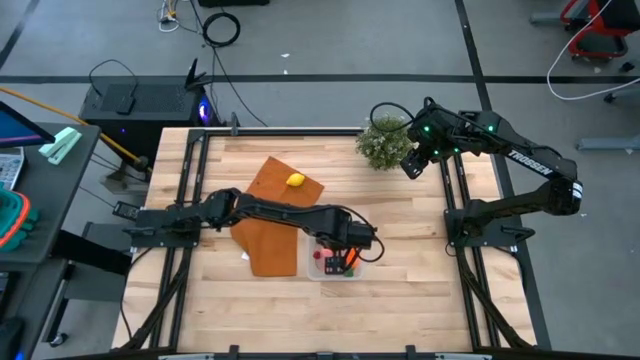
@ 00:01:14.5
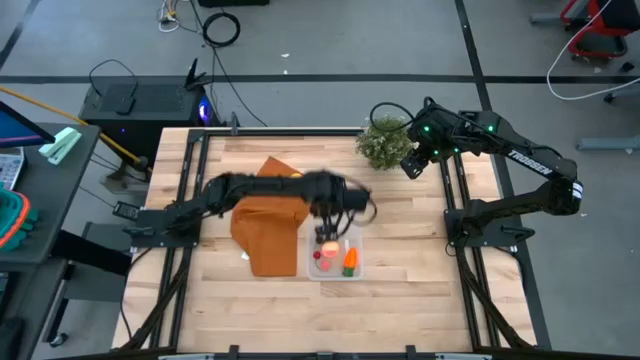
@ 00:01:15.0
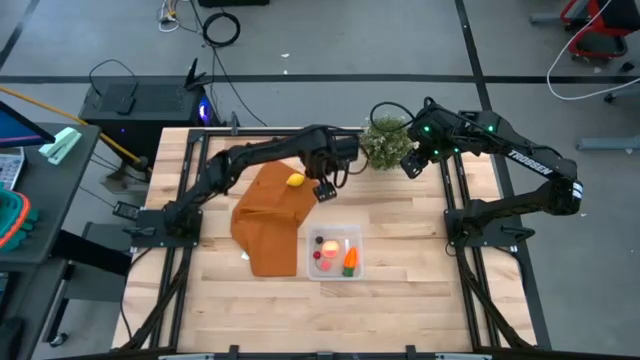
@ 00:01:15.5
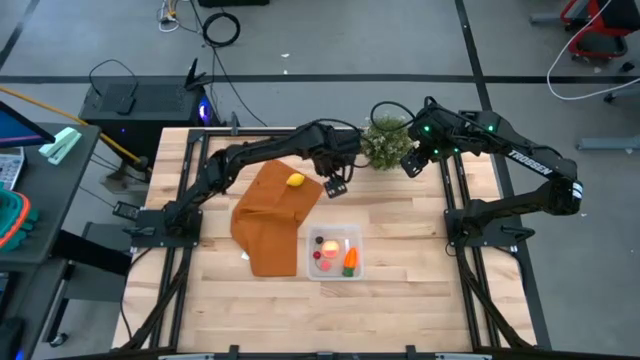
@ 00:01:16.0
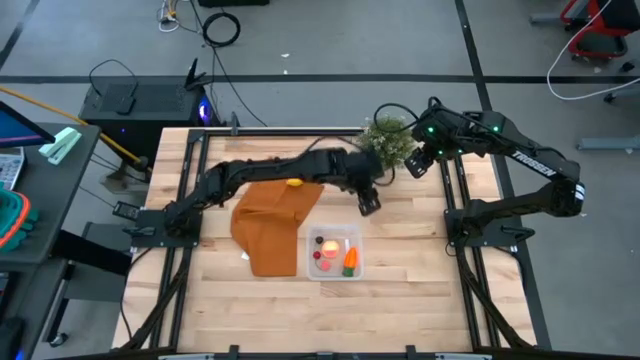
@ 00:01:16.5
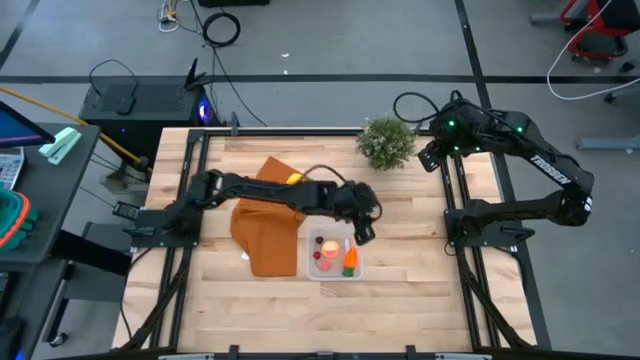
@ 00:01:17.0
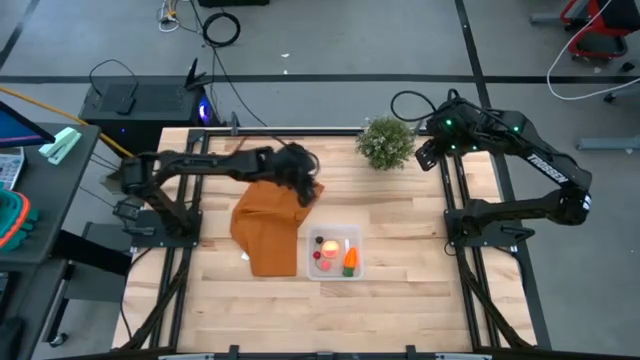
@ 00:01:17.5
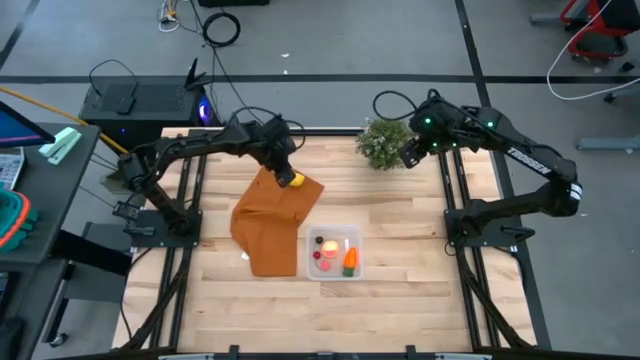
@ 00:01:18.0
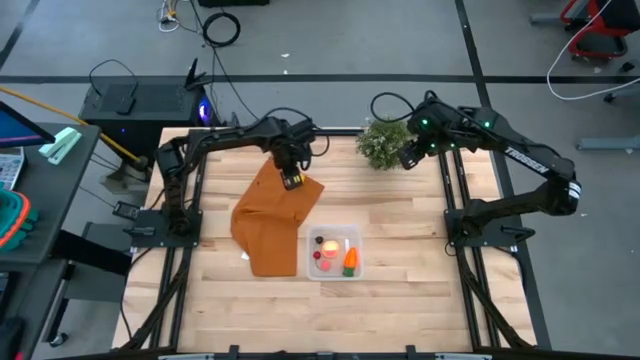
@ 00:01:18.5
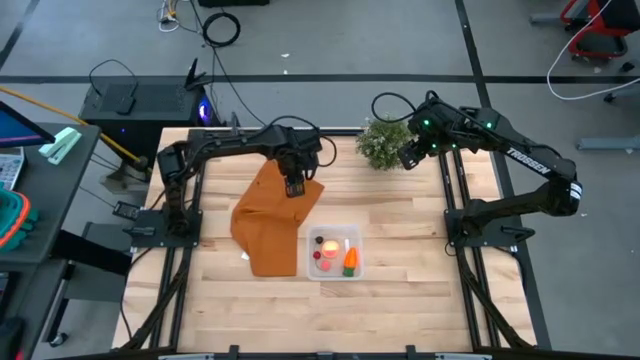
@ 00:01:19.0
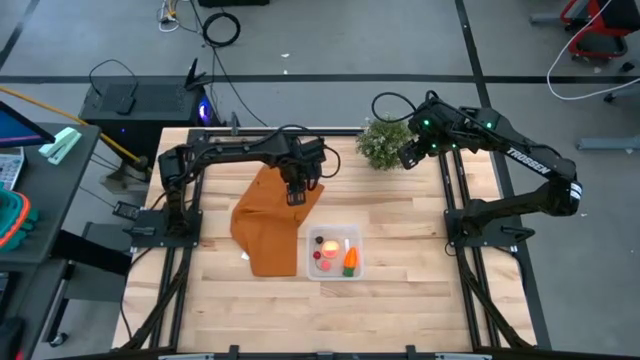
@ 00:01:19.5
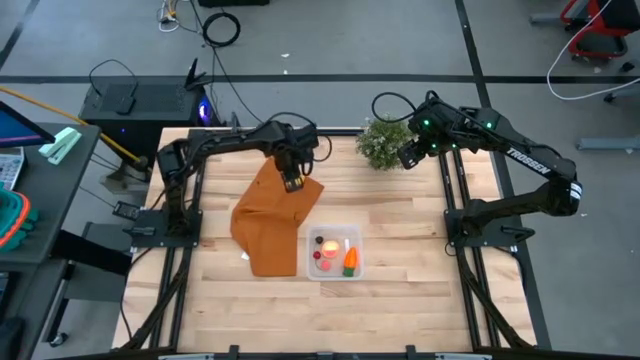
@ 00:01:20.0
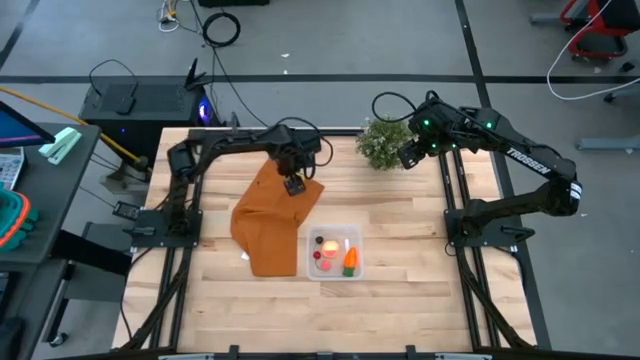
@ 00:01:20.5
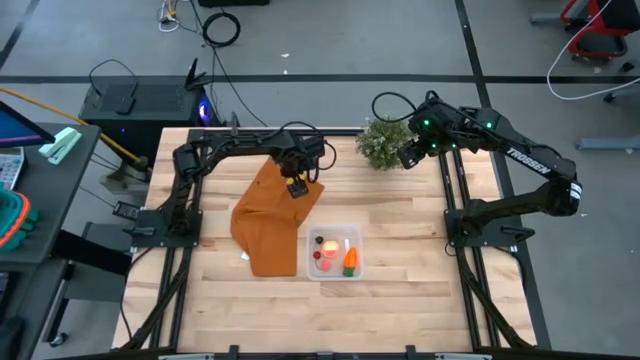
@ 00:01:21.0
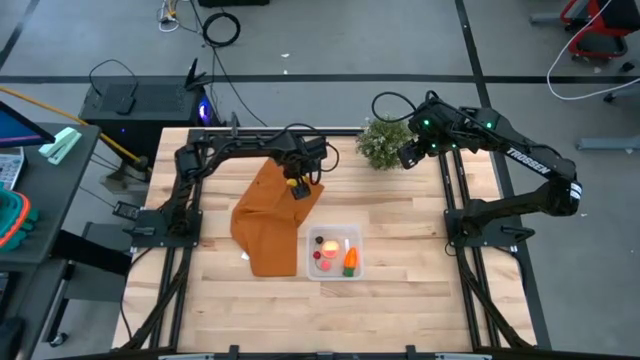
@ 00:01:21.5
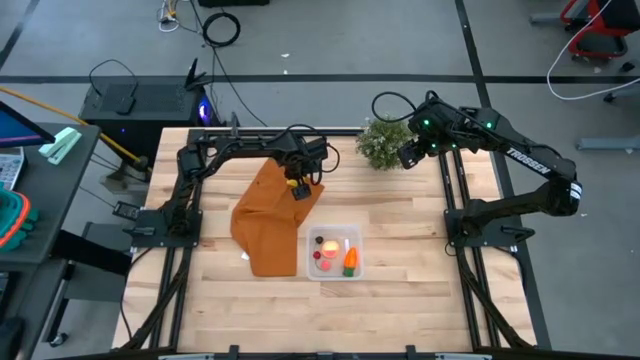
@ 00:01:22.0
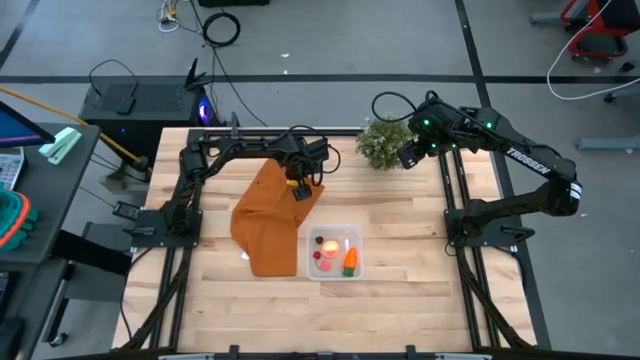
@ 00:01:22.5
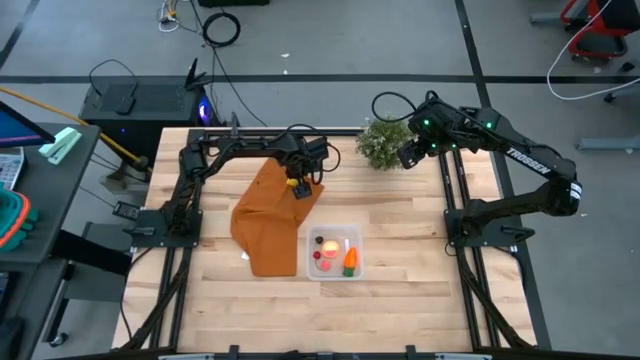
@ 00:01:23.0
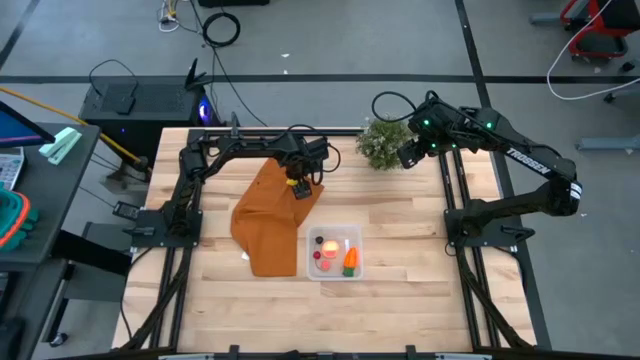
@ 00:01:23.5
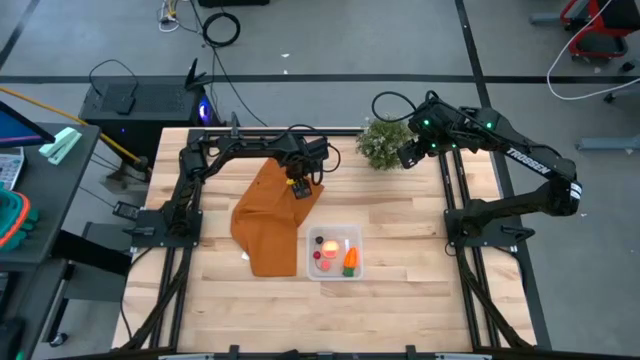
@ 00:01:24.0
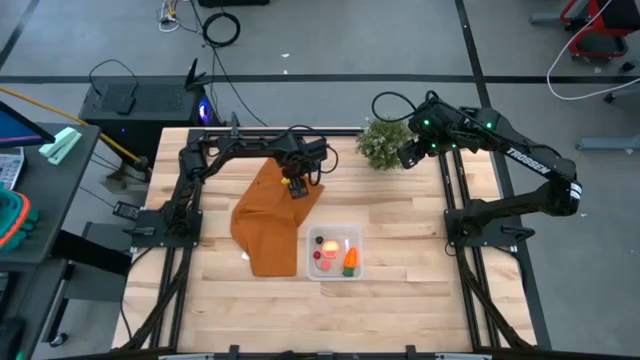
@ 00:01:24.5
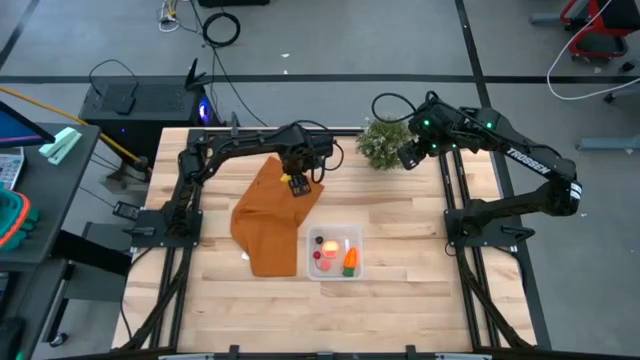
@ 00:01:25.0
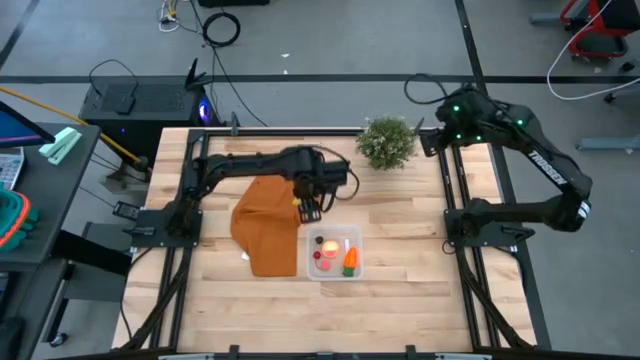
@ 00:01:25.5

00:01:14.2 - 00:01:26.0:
Task: Pick and placing Produce into tupperware
Put the yellow lemon into the transparent bin

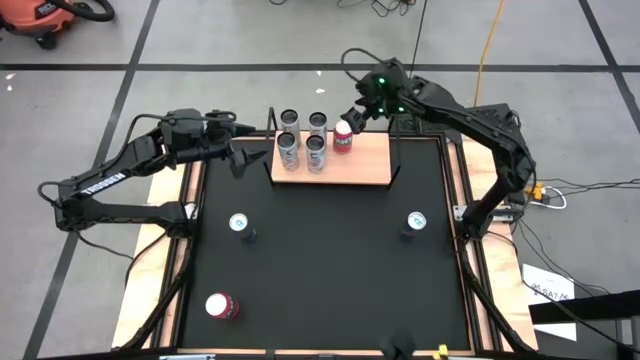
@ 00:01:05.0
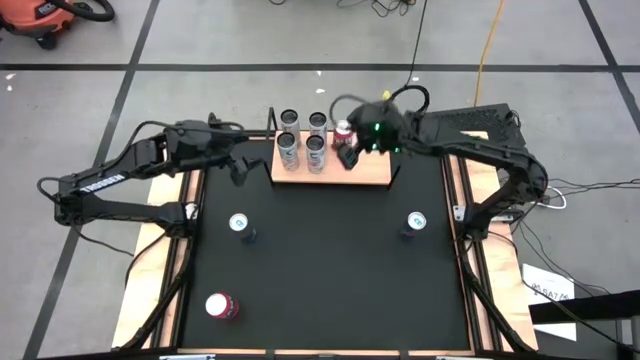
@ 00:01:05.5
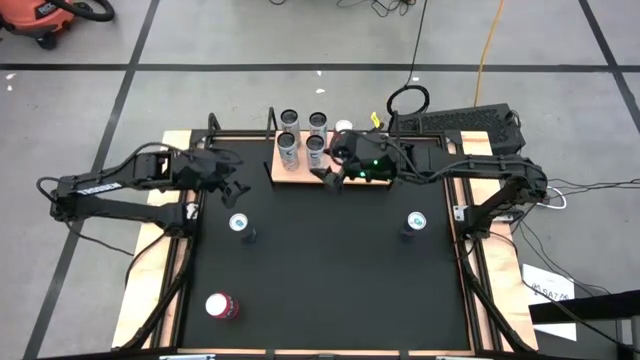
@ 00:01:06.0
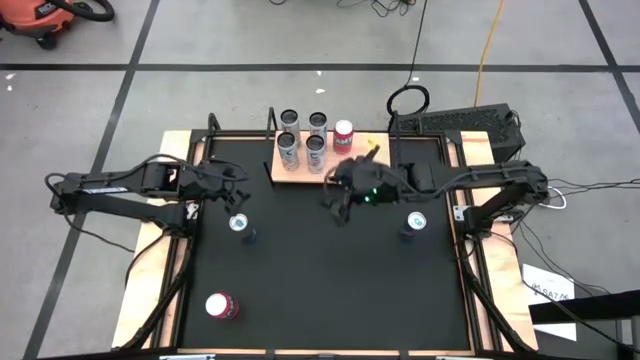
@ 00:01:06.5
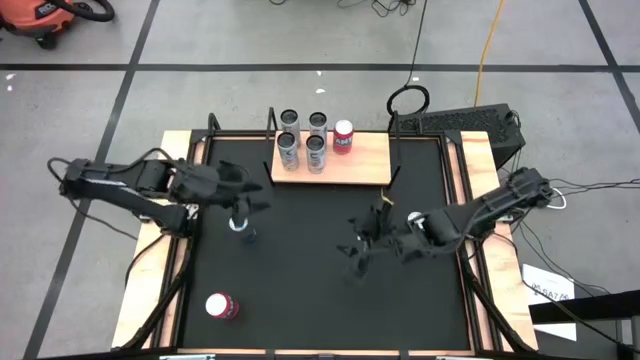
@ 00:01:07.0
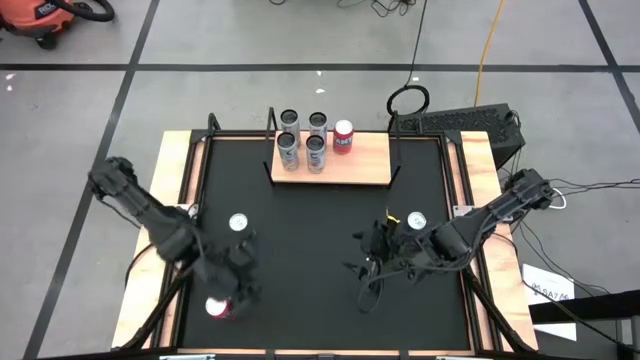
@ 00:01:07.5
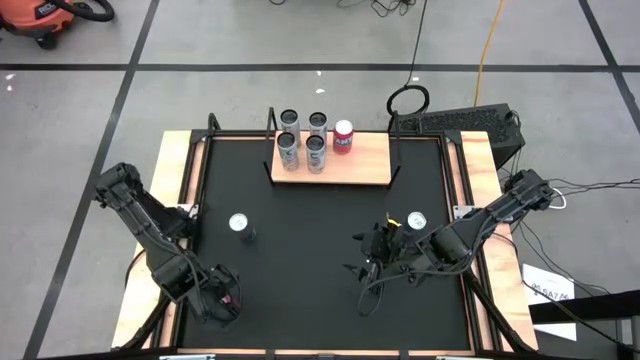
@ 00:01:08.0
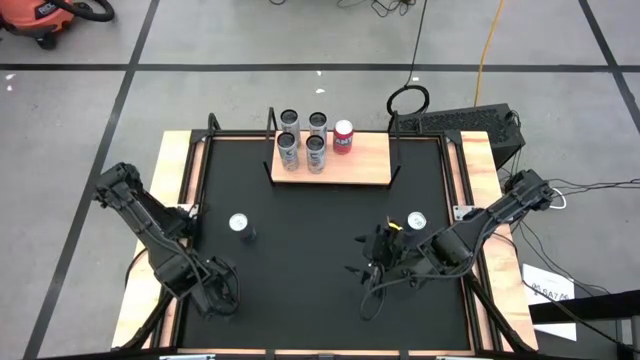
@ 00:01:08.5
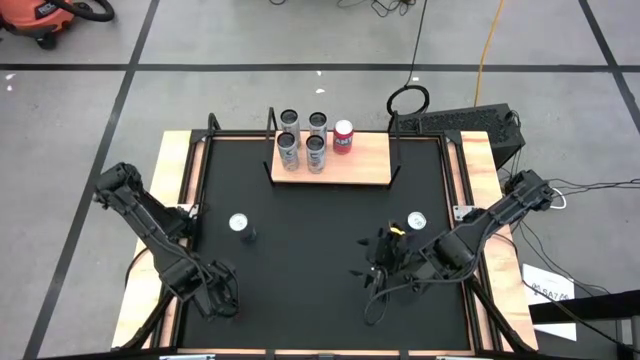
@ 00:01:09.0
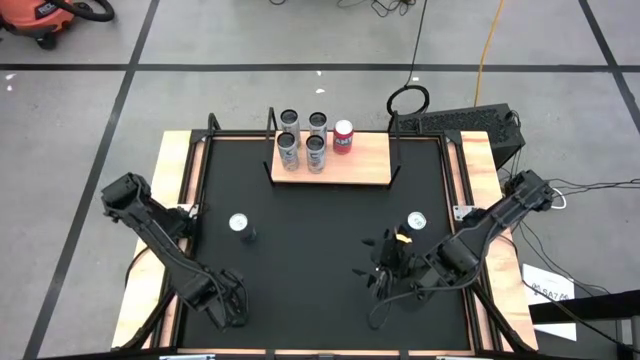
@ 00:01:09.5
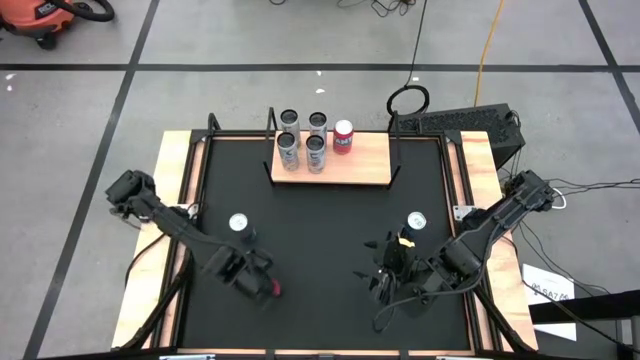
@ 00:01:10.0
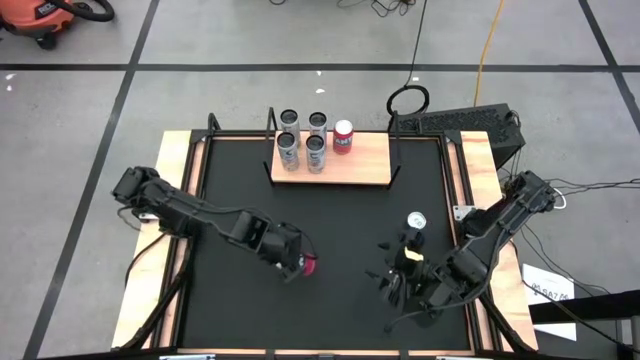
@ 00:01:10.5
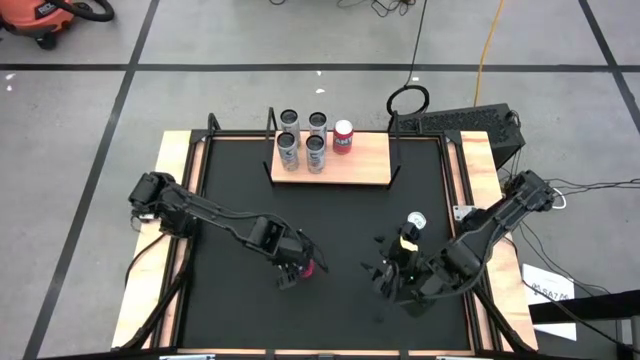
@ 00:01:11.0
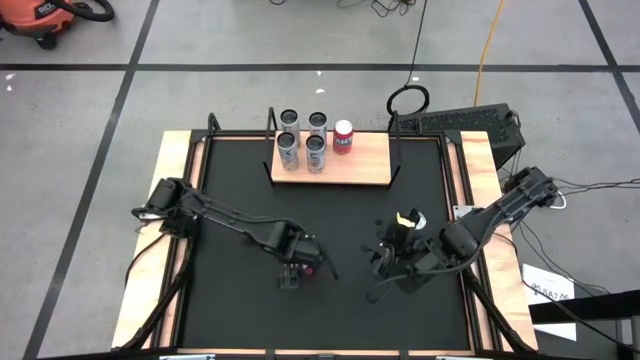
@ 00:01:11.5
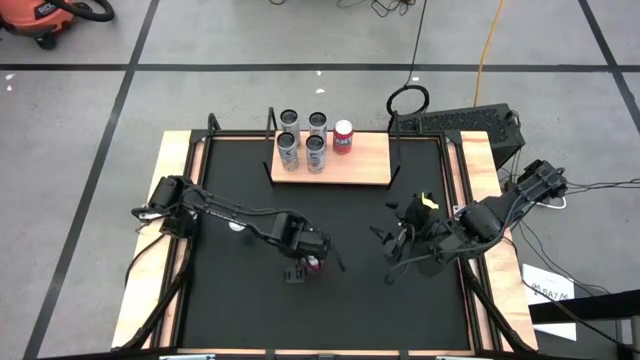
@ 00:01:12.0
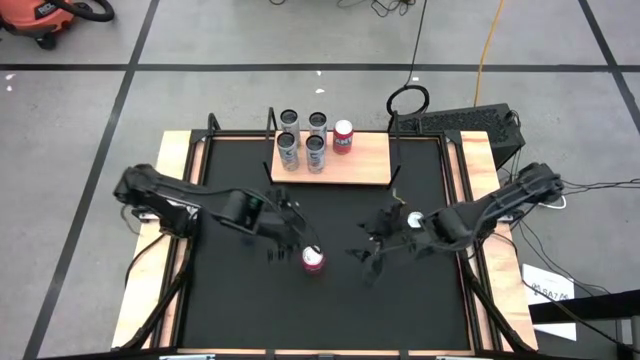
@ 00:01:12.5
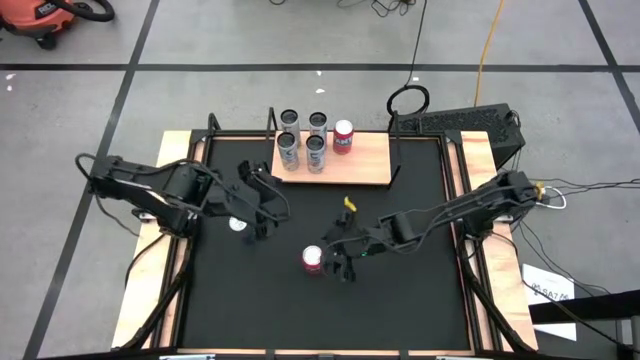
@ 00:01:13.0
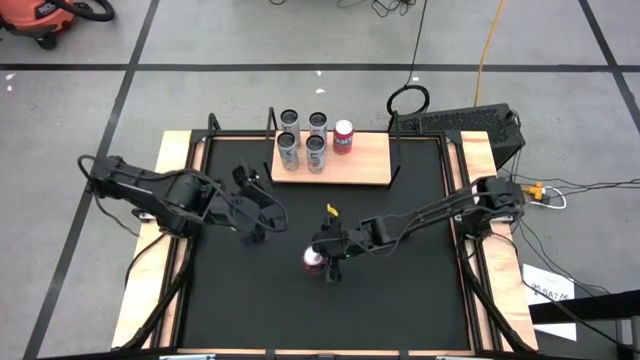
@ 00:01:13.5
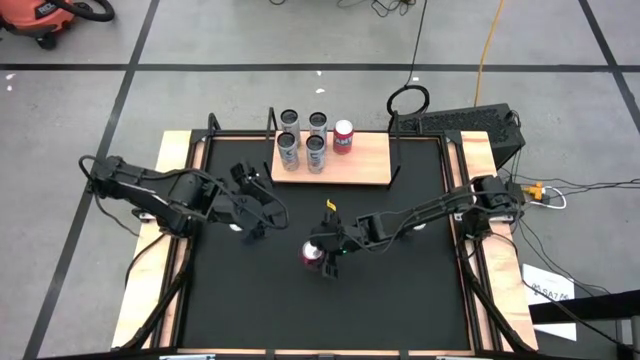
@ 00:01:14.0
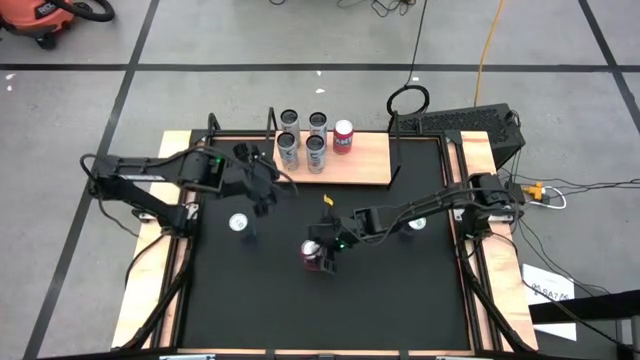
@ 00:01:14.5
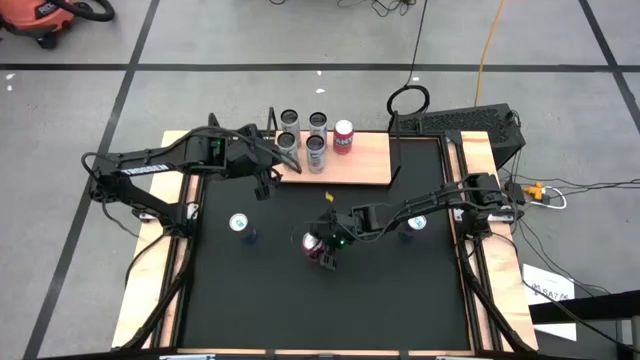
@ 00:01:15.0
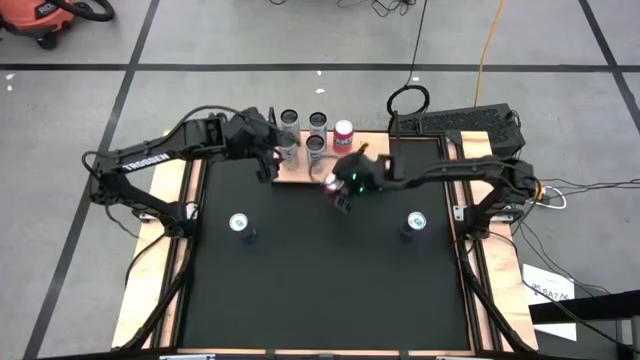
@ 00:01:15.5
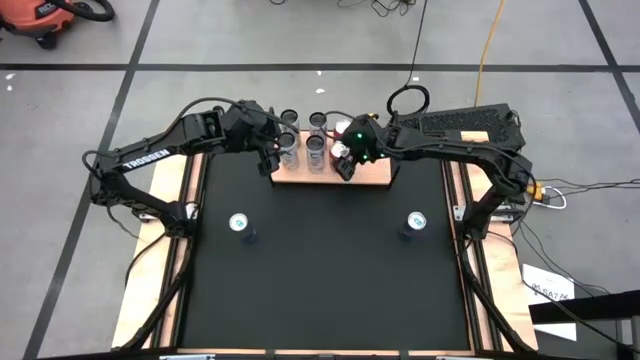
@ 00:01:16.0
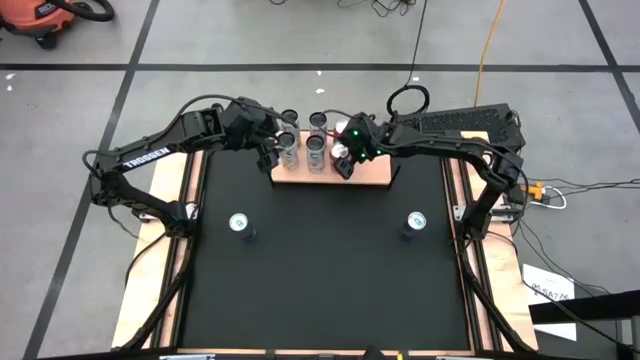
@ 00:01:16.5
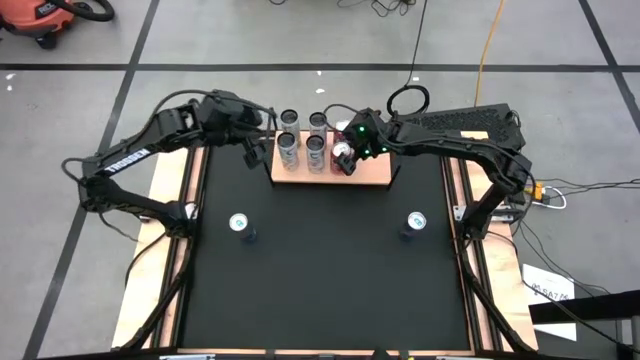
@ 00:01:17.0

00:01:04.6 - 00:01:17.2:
Task: Place canned beverage on shelf
Put the red soda can on the shelf aligned with the other red soda can
